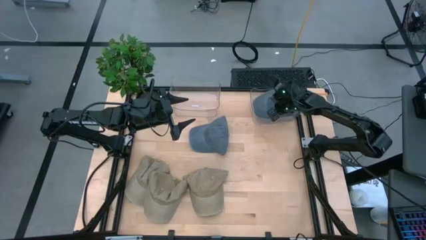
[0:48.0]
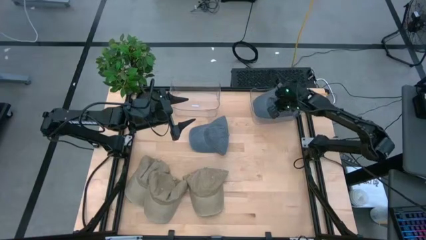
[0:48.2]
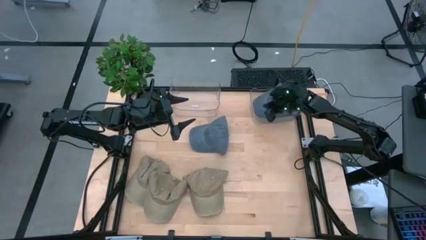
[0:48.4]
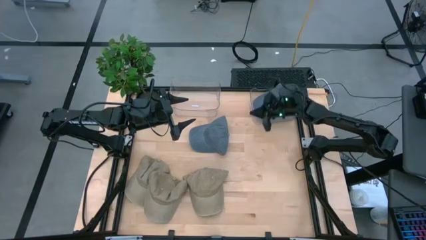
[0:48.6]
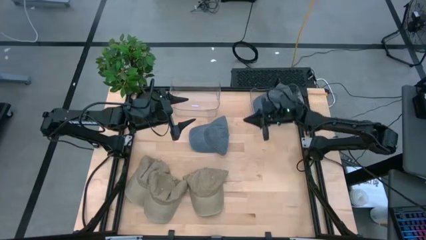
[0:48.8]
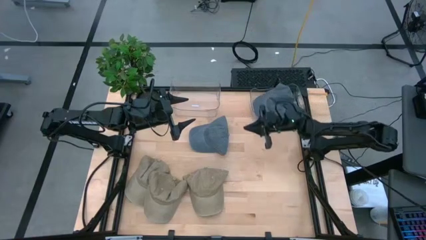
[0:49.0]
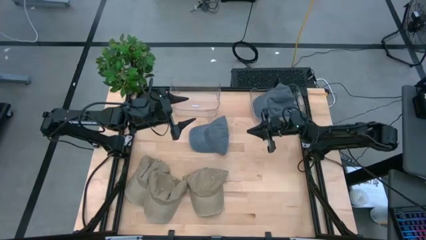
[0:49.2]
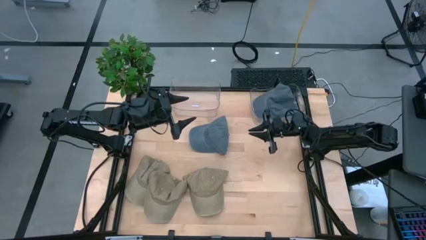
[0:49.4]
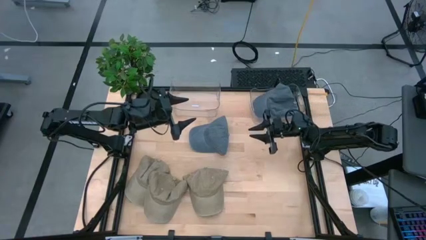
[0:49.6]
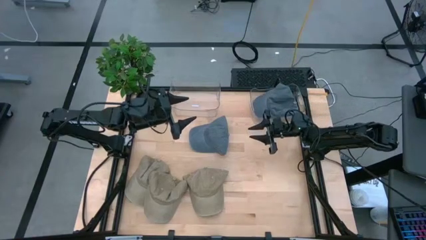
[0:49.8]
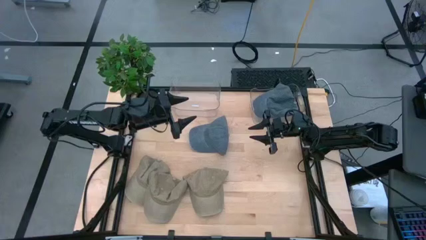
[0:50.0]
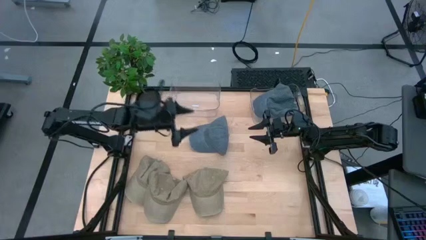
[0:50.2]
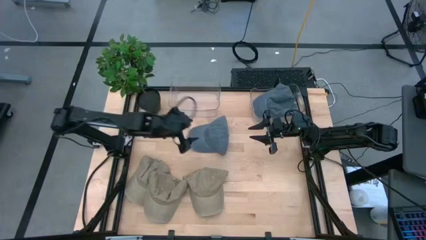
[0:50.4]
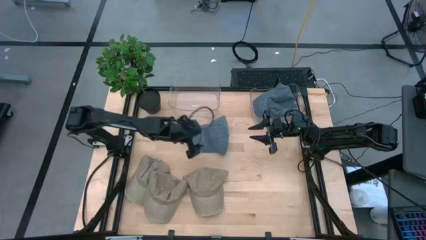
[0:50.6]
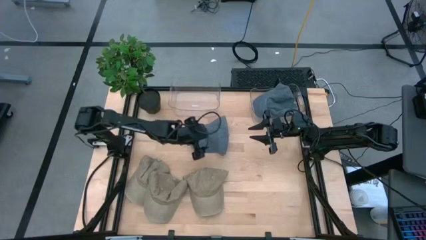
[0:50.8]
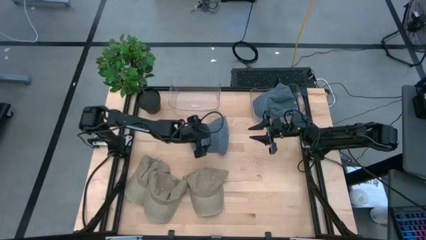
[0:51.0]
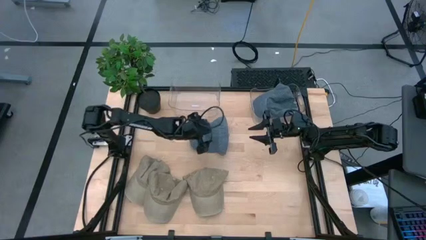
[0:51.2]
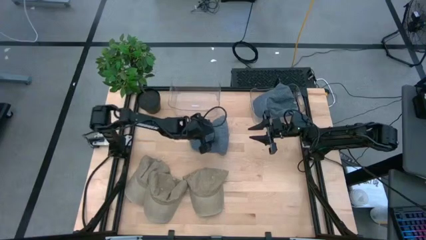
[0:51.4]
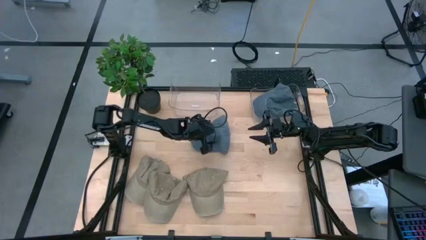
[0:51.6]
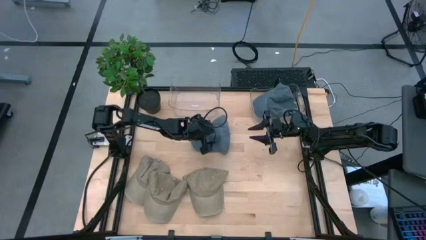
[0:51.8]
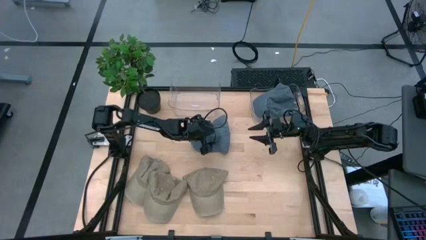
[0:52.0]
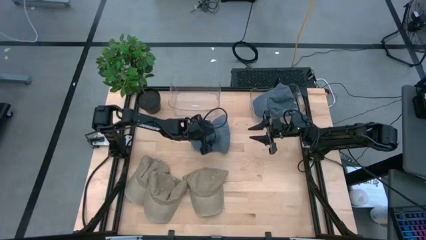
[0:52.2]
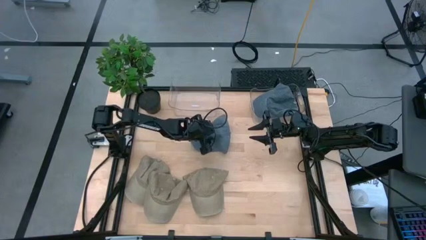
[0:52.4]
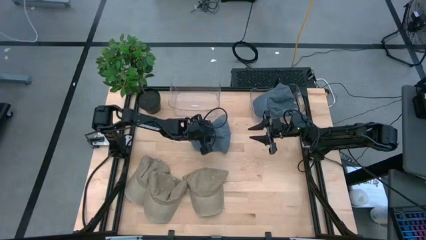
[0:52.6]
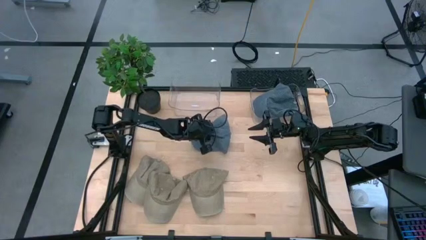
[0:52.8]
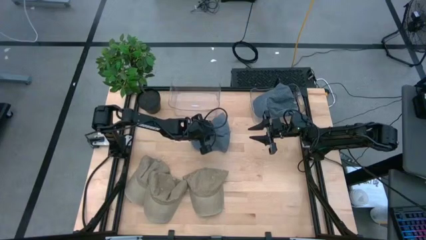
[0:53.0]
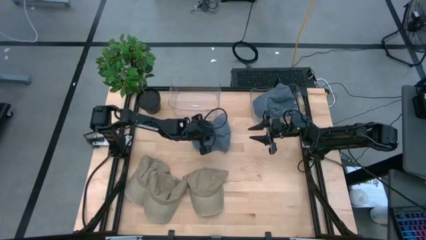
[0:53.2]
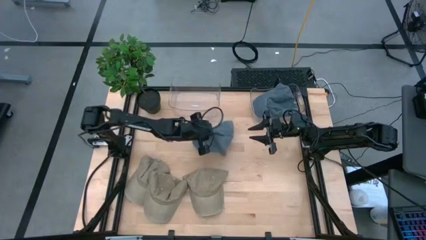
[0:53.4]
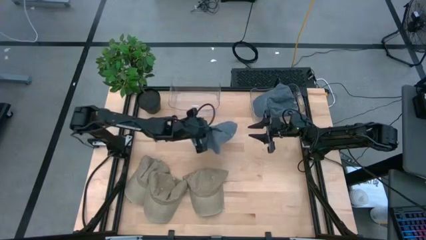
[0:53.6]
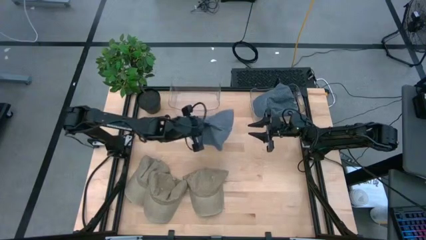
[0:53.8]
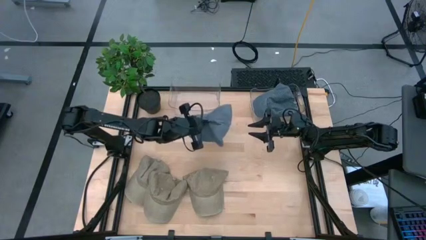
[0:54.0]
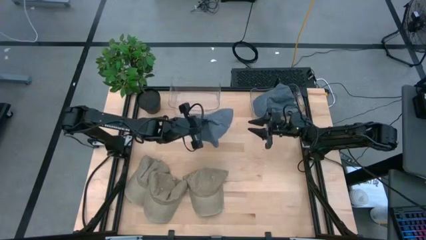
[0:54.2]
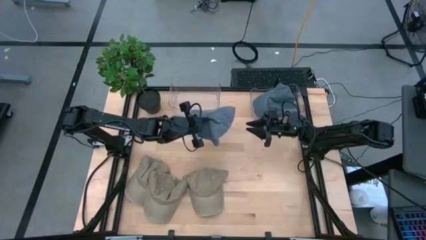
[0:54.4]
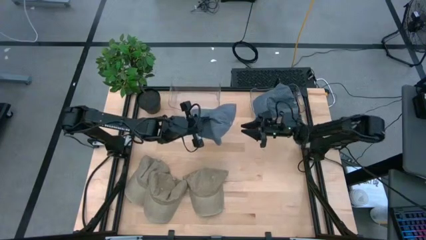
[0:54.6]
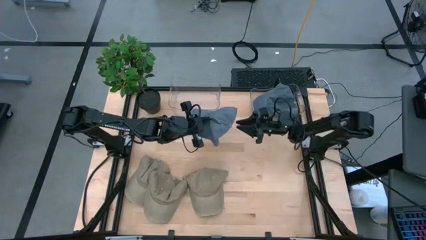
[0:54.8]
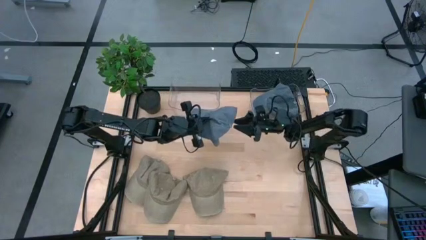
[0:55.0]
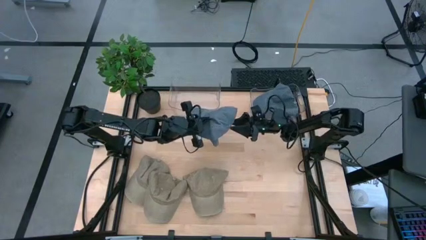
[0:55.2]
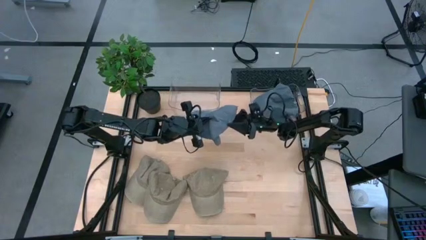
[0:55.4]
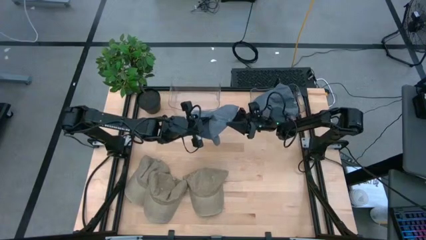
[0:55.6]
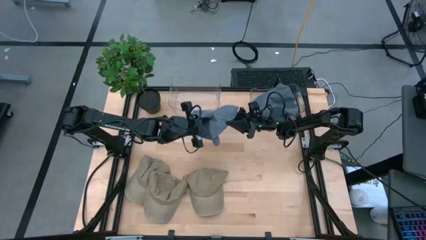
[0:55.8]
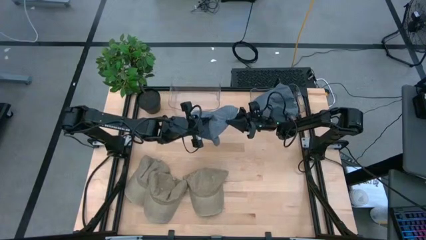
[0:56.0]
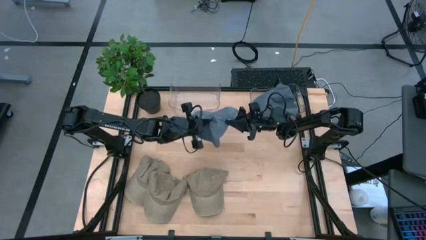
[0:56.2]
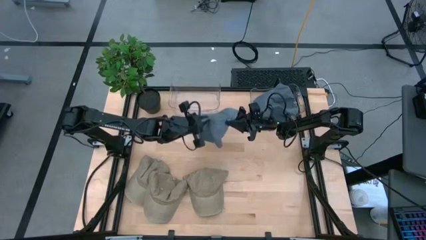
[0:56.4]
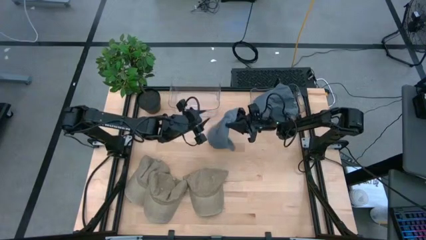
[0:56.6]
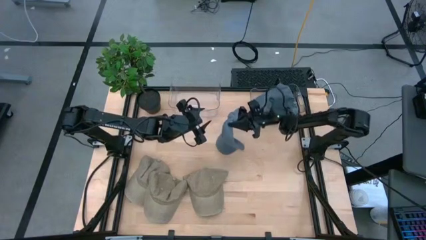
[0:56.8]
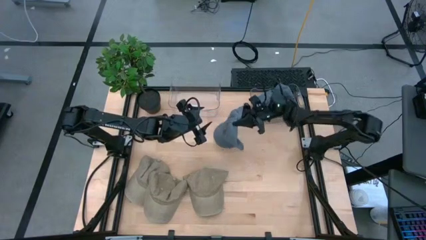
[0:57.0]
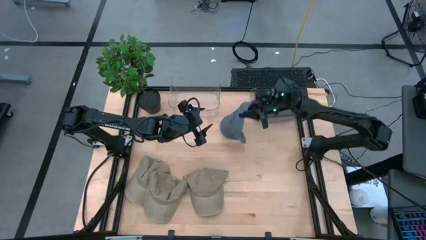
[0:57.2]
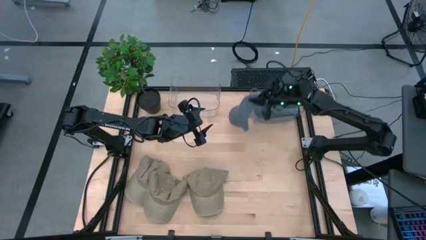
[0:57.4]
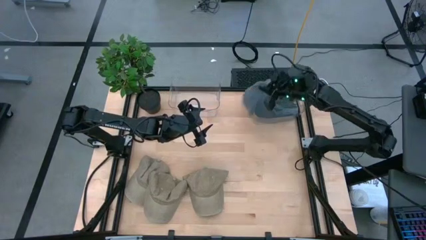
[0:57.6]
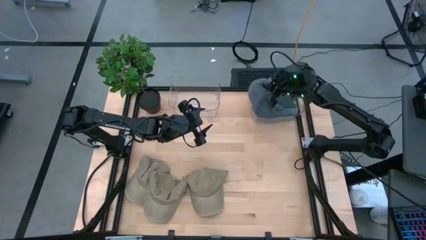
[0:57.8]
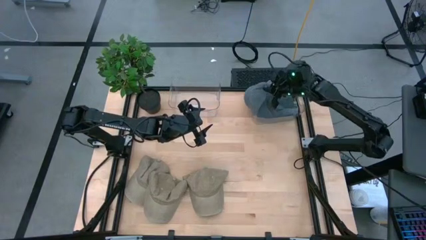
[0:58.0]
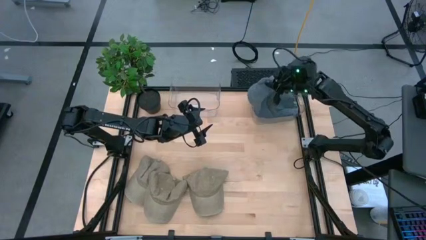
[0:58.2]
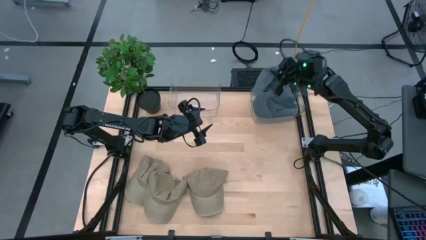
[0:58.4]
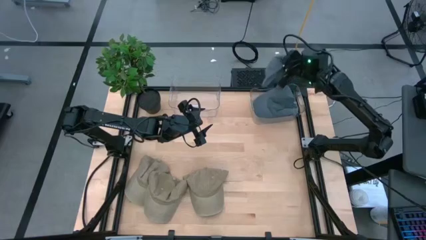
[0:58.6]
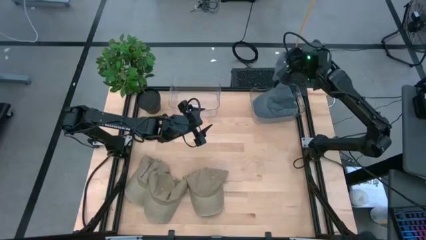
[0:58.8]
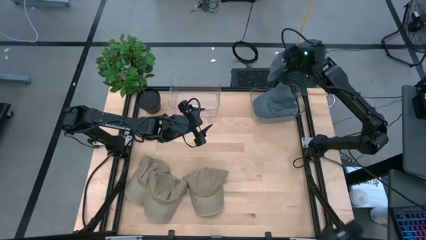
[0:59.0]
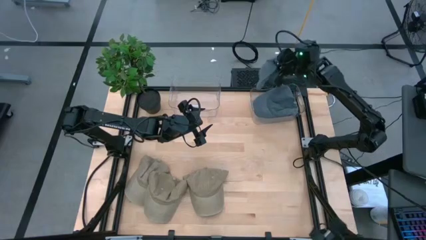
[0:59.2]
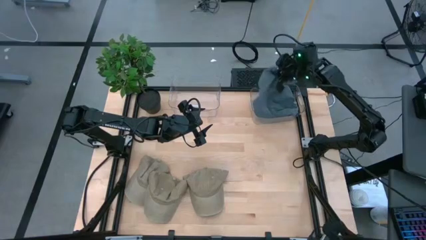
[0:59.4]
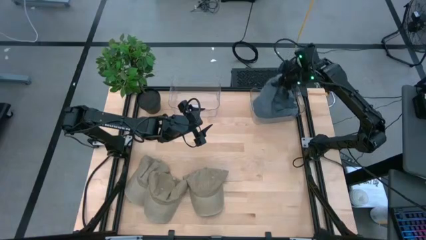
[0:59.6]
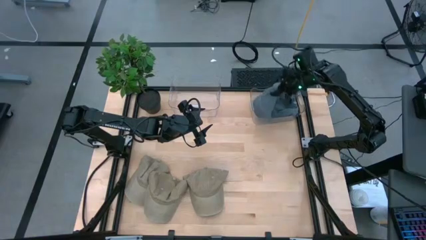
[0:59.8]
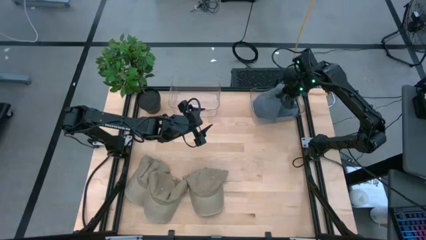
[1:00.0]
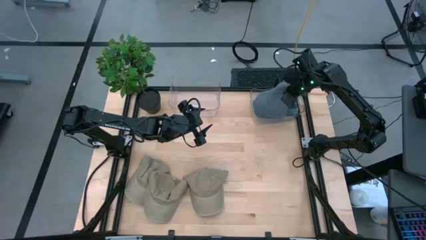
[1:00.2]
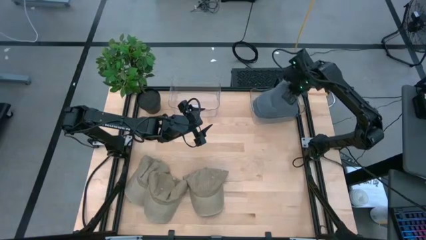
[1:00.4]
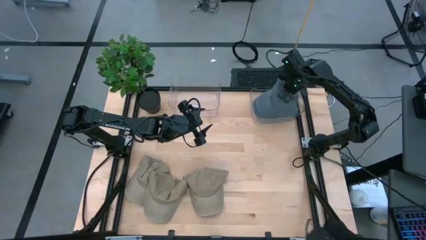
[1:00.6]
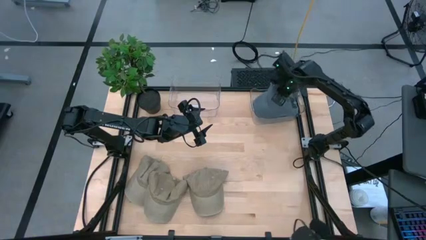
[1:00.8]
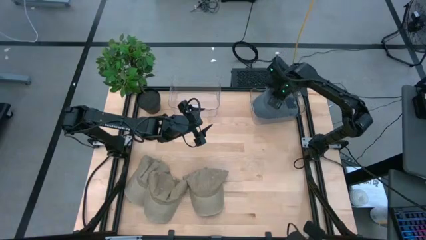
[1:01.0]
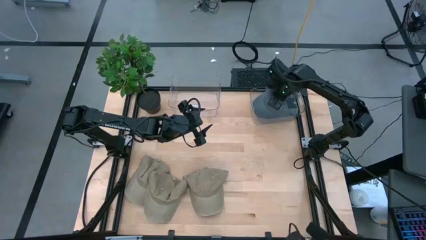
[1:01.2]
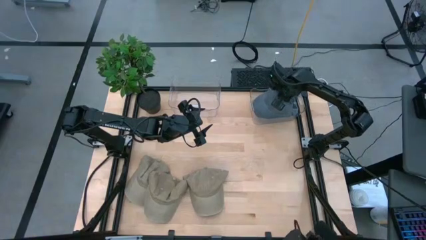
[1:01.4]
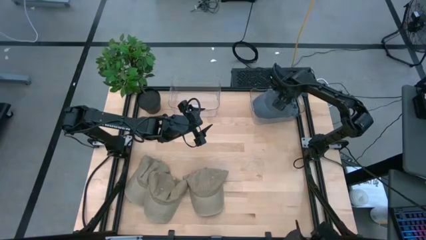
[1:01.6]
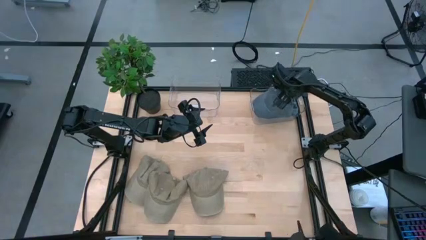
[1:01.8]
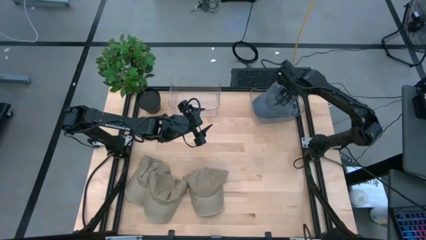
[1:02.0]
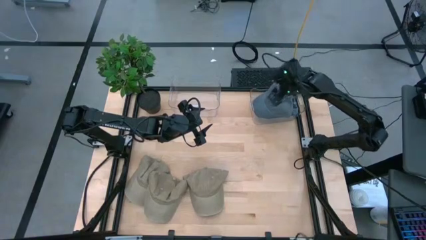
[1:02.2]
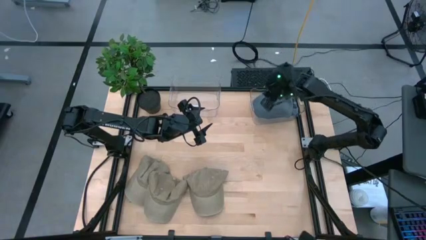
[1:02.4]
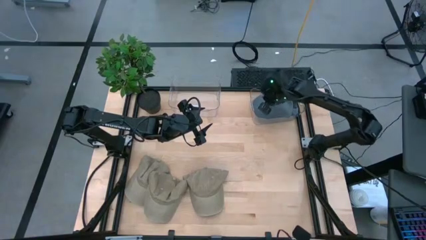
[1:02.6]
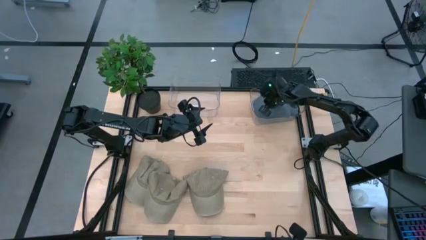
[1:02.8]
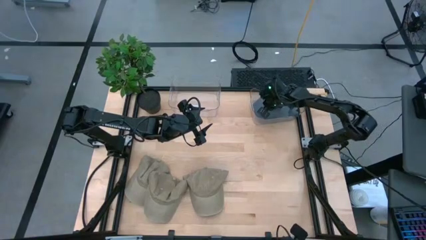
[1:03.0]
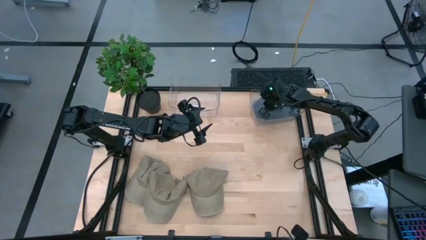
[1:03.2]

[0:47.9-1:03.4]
Task: Pick & Place hat
Put the blue cap into the right transparent bin
